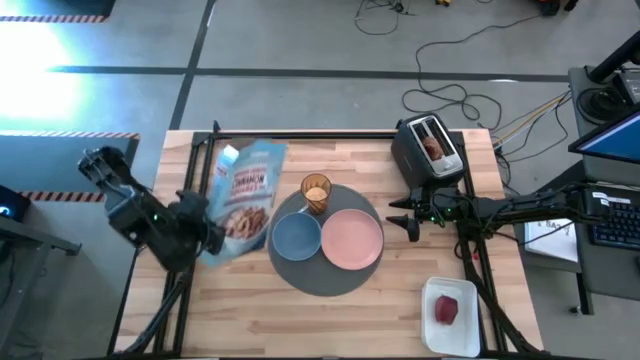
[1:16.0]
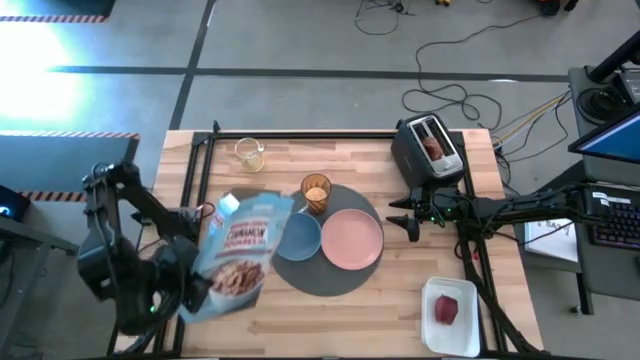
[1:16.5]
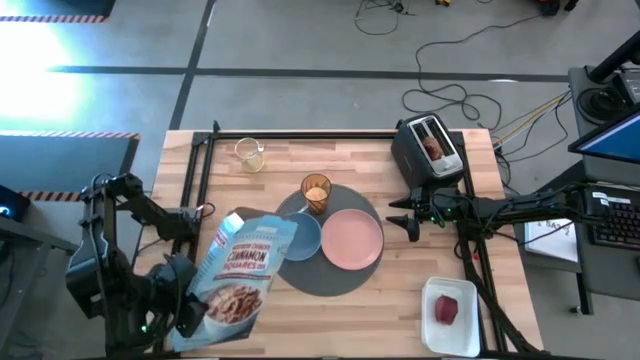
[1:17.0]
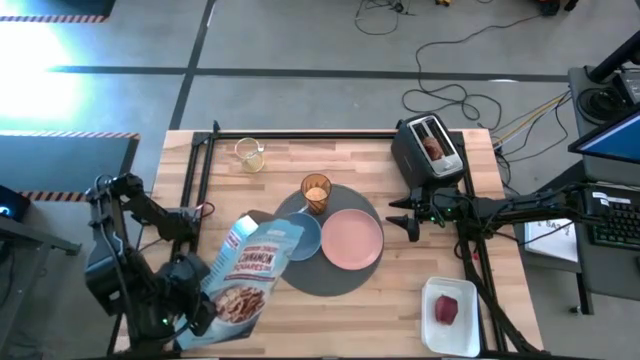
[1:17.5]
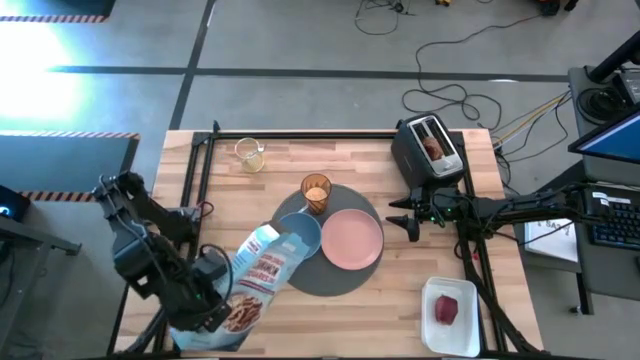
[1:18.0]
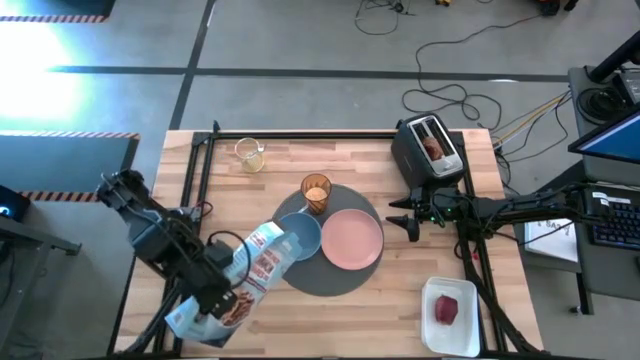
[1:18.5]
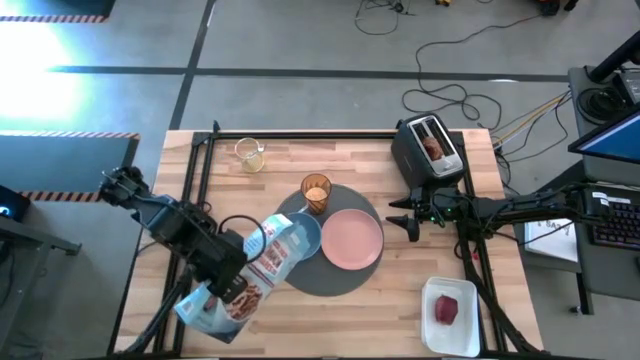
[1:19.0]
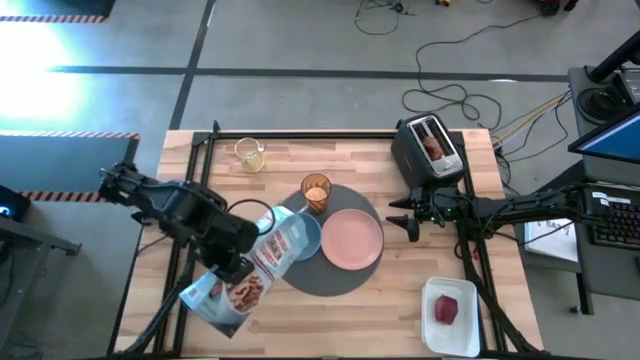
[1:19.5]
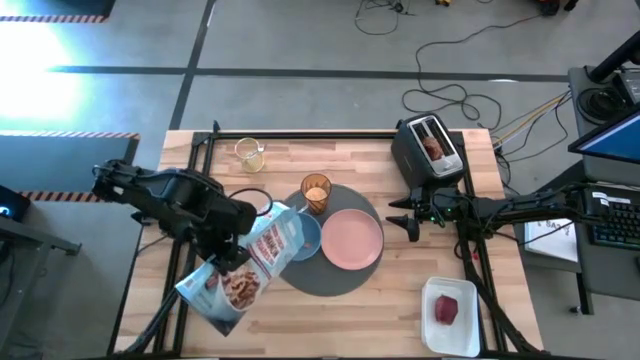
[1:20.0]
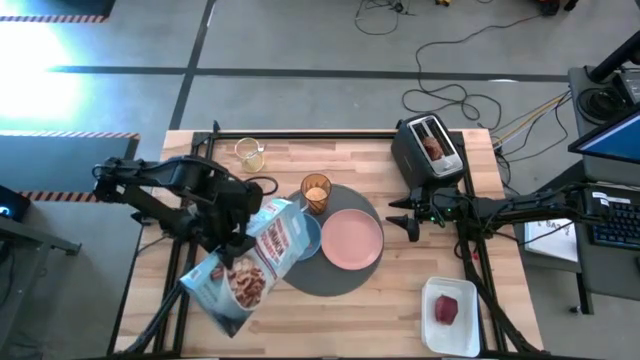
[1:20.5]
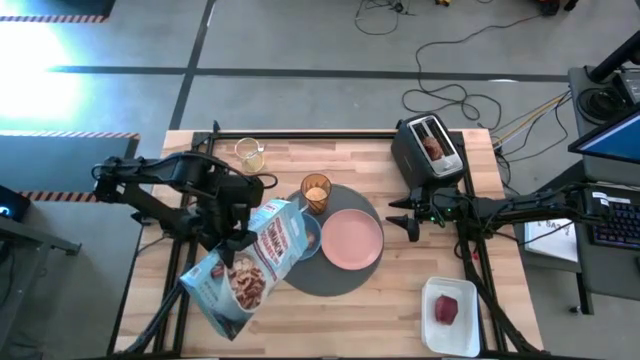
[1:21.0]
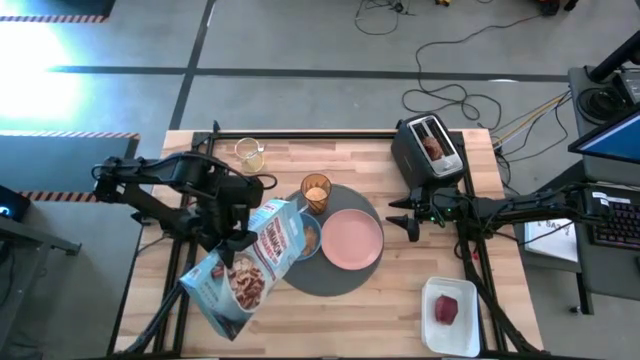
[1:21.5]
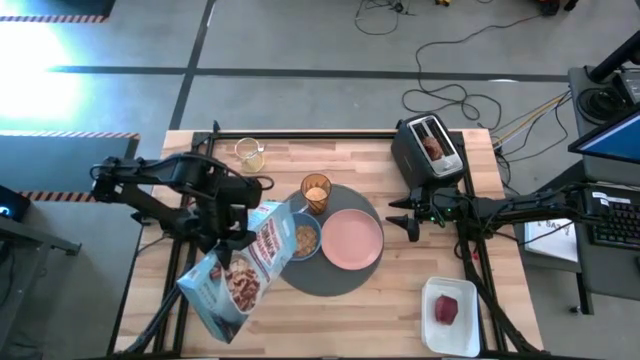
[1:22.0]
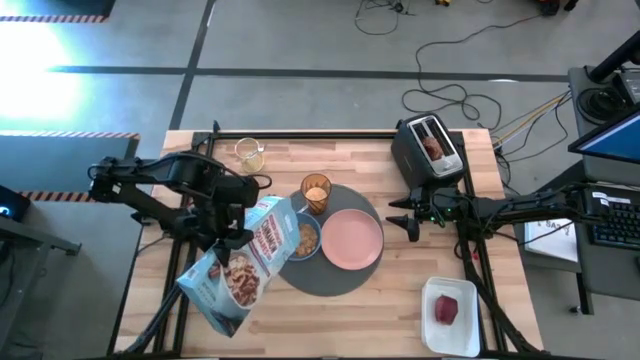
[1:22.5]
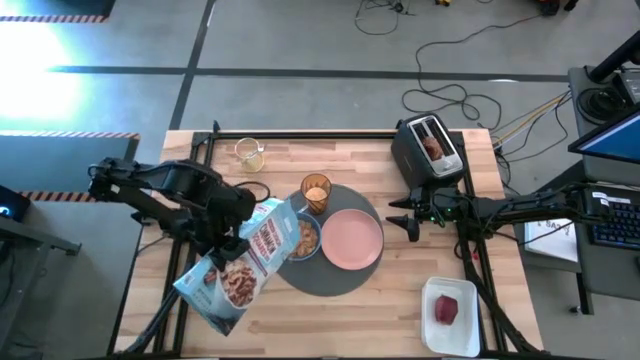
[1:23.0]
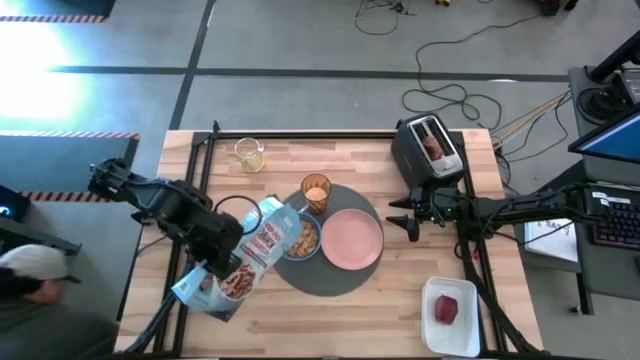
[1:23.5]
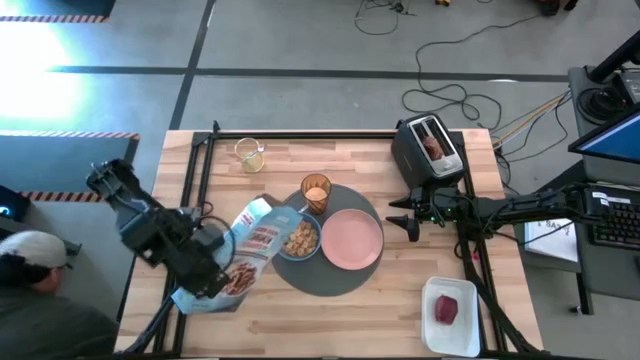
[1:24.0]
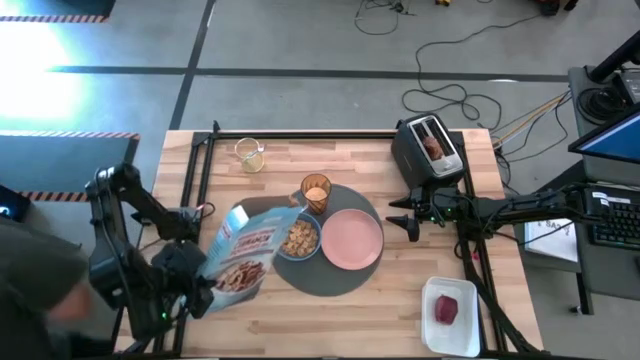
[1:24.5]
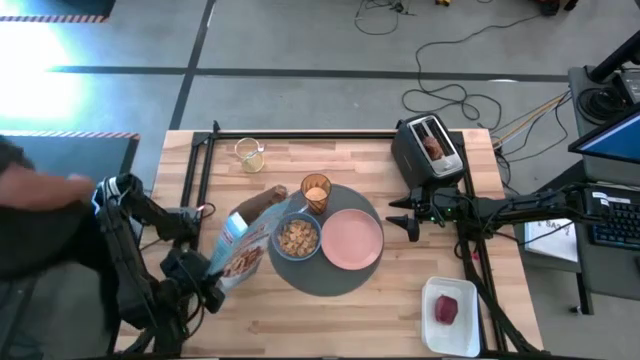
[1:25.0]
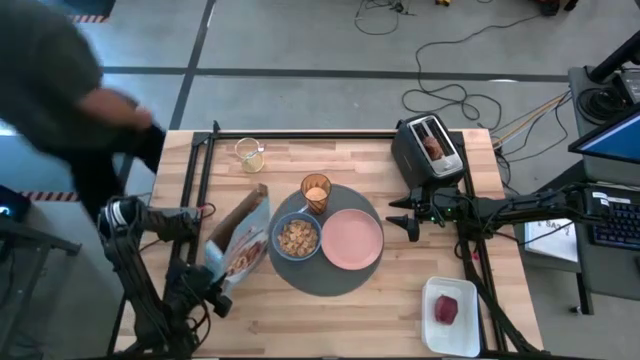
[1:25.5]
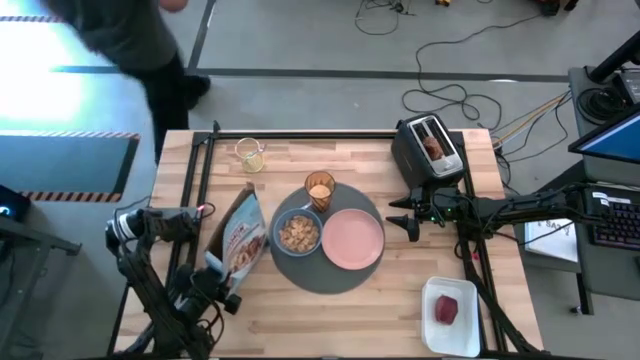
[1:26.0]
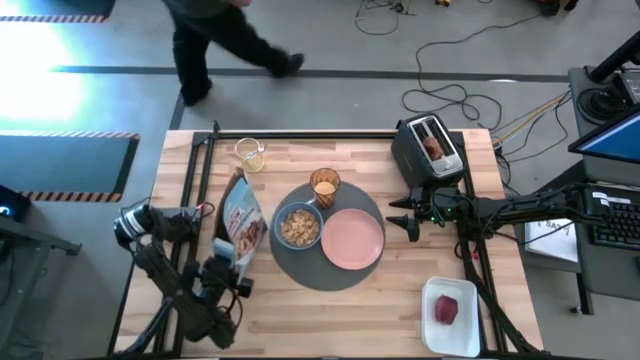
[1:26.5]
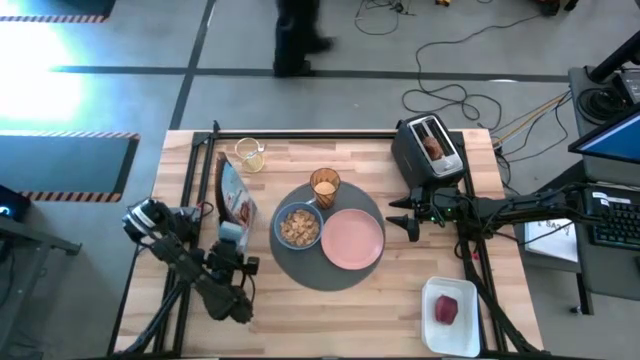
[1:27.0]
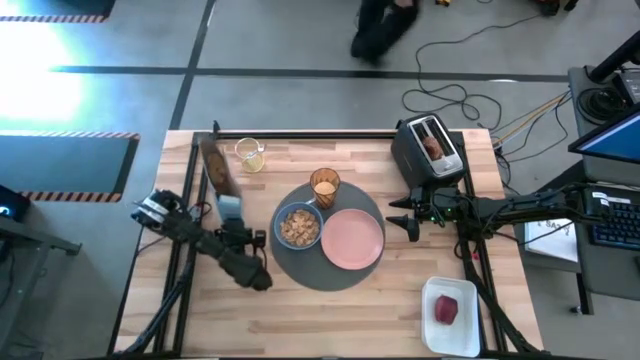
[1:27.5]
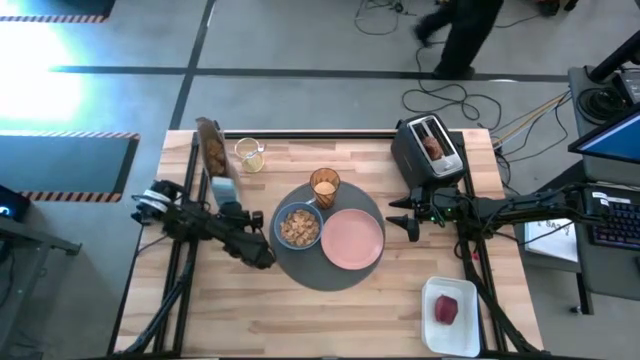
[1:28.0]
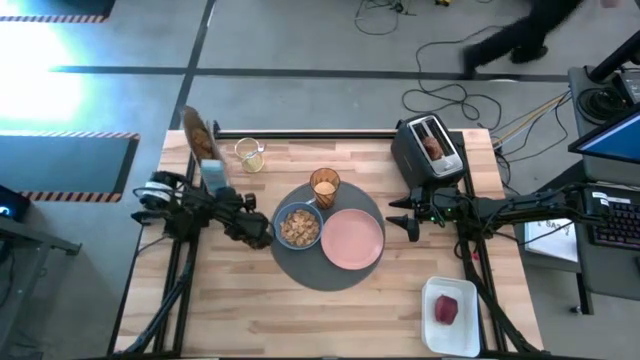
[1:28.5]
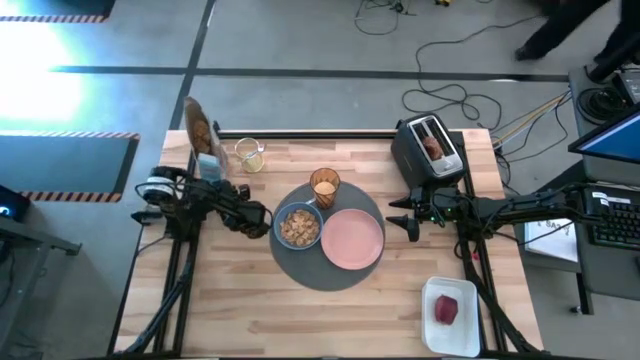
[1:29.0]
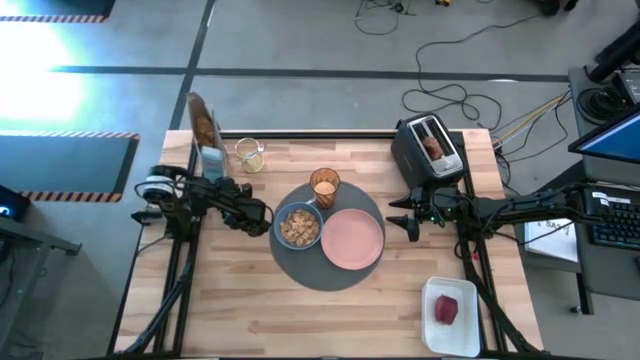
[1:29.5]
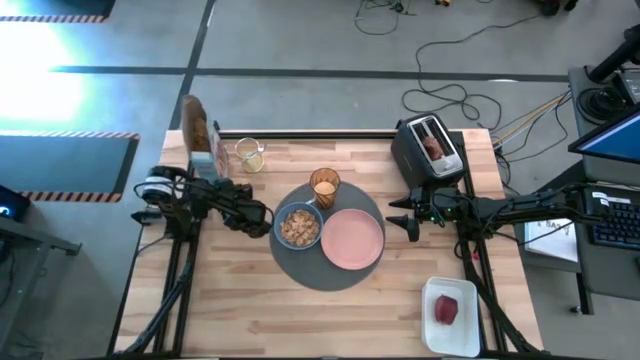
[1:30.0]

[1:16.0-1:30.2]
Task: Arrange a breakfast setting
Pour the cereal into the blue bowl

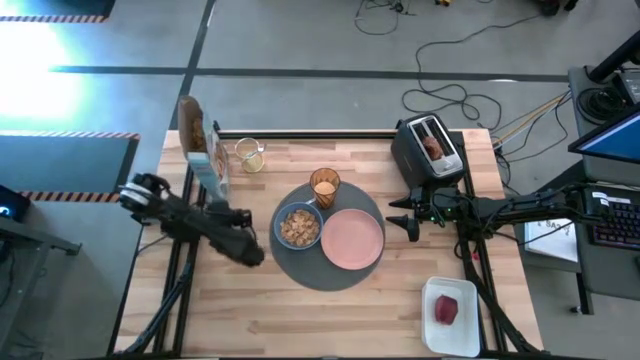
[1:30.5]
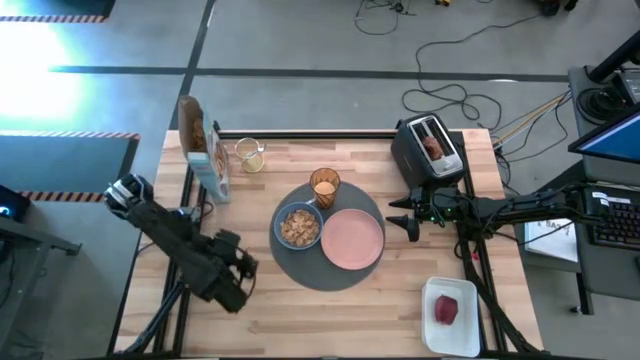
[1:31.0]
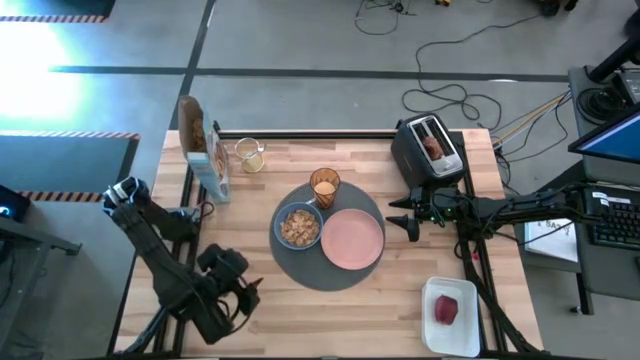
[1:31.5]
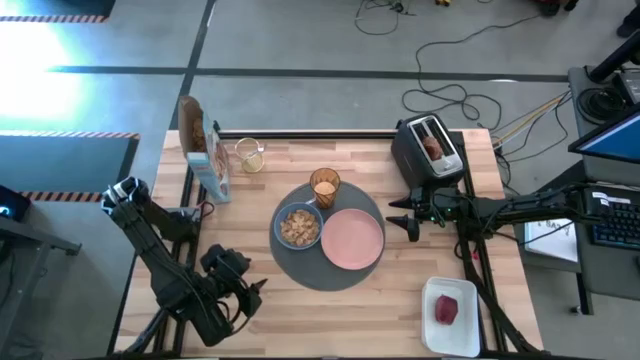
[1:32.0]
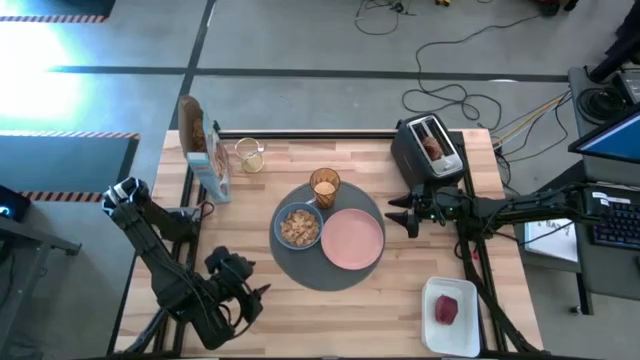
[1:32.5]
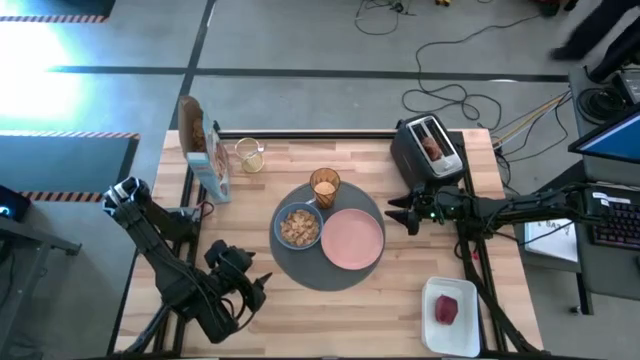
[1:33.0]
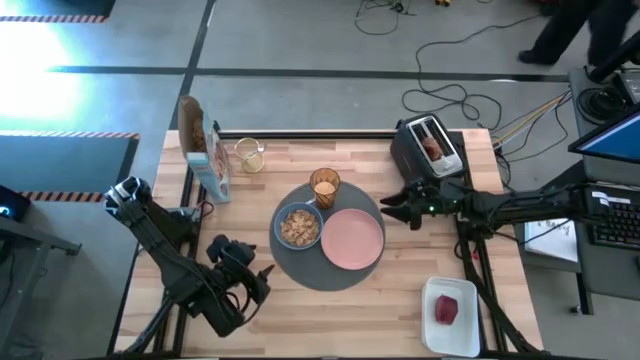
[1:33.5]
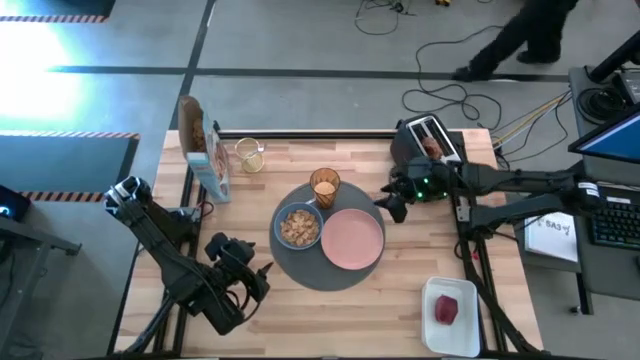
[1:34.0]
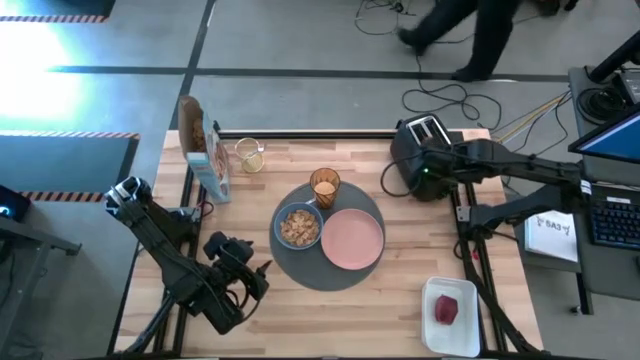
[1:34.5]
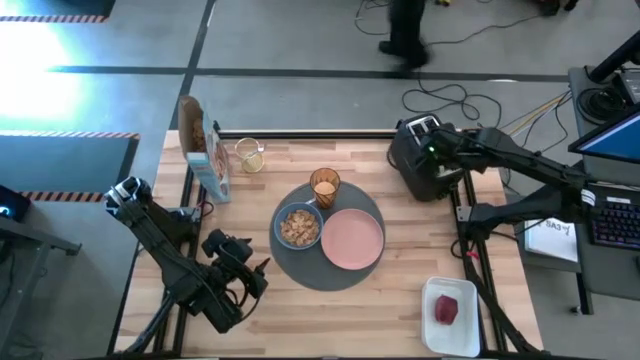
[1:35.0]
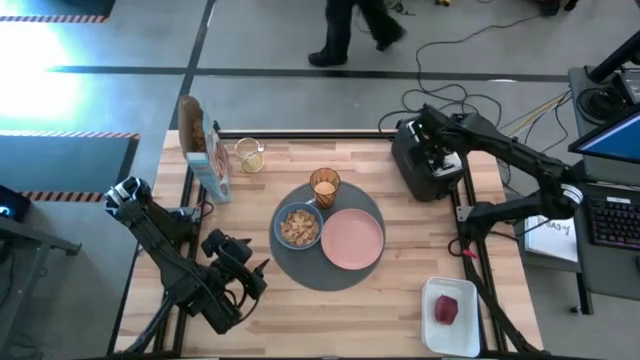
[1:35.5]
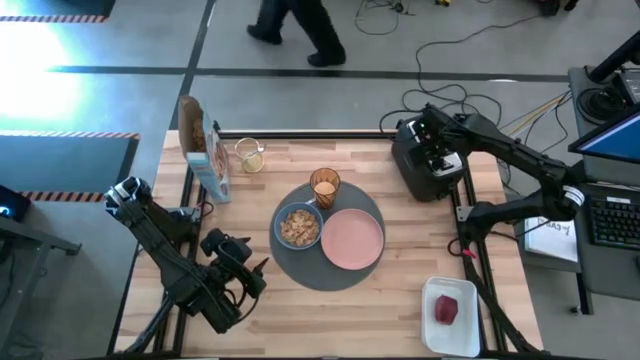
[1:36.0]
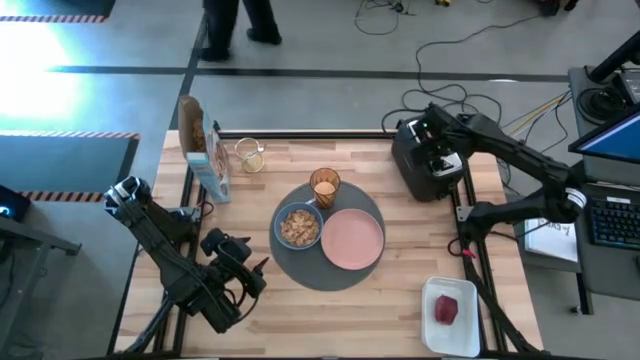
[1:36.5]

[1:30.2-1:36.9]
Put the bread on the pink plate
